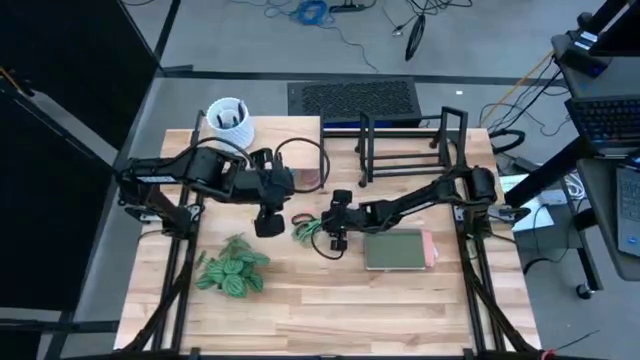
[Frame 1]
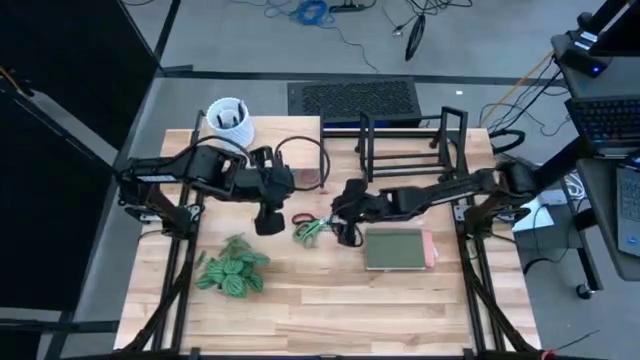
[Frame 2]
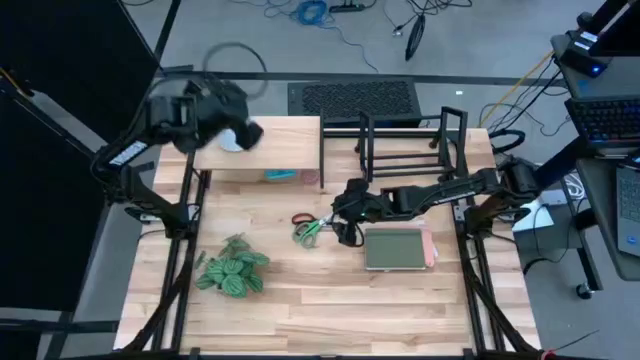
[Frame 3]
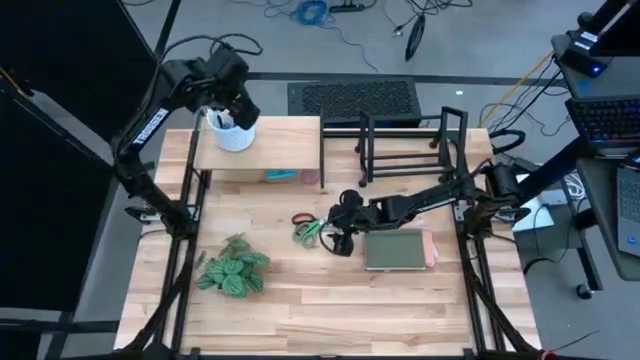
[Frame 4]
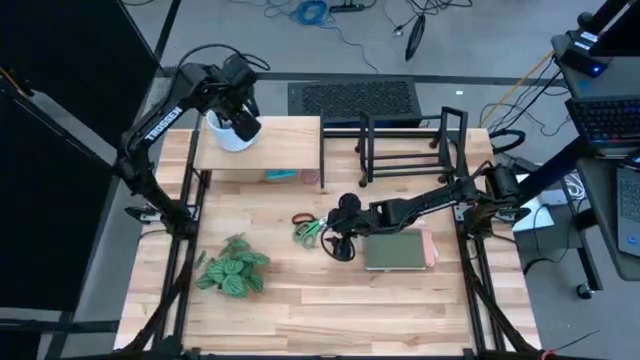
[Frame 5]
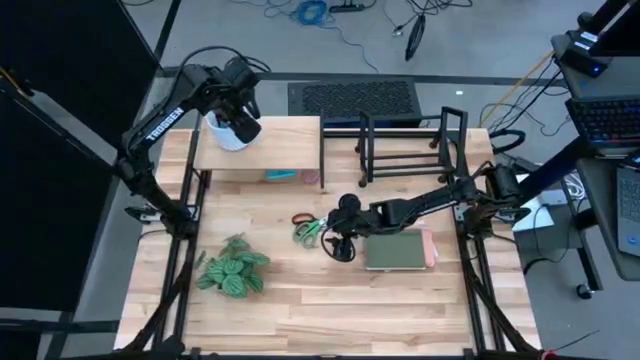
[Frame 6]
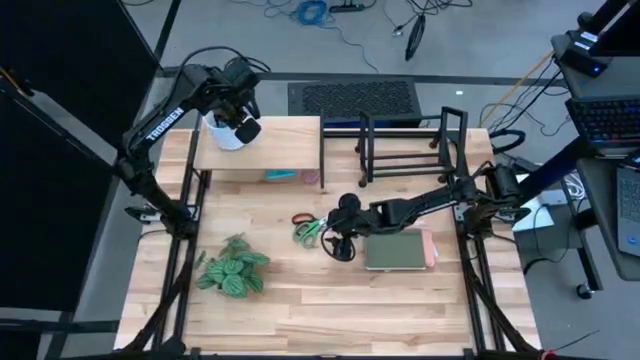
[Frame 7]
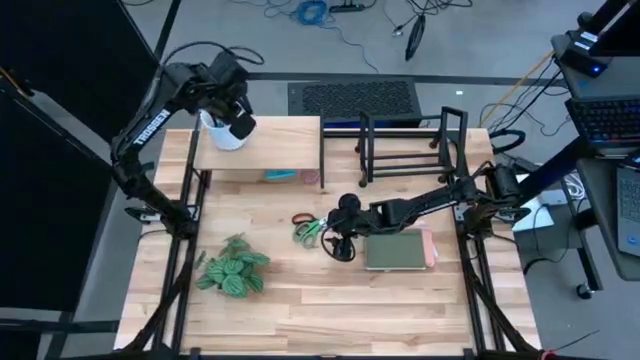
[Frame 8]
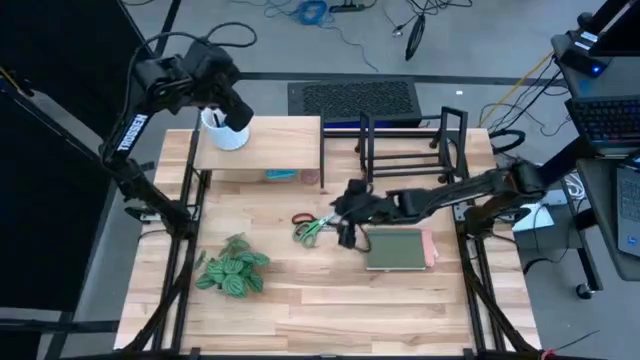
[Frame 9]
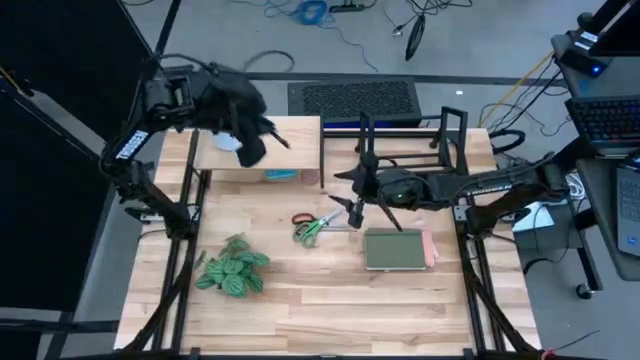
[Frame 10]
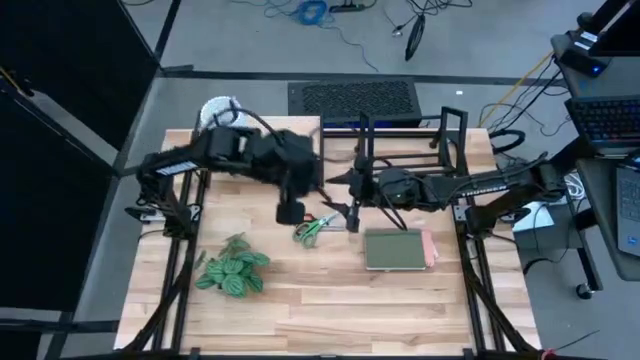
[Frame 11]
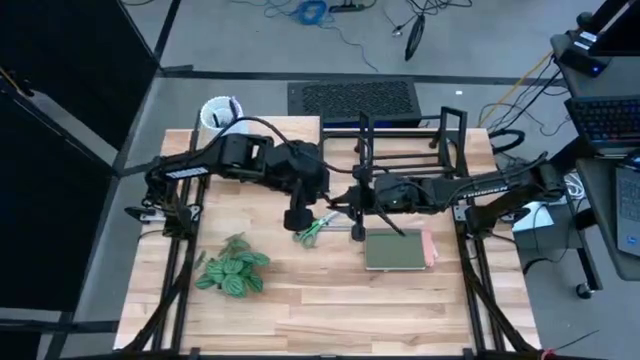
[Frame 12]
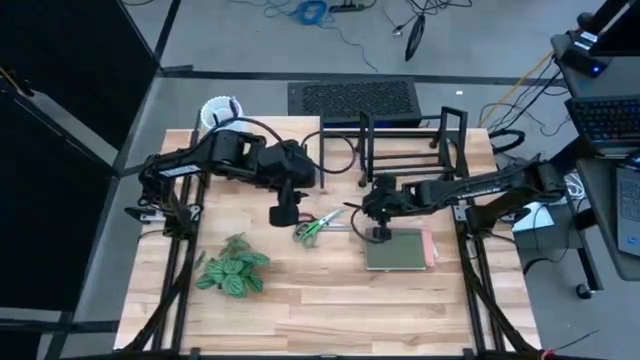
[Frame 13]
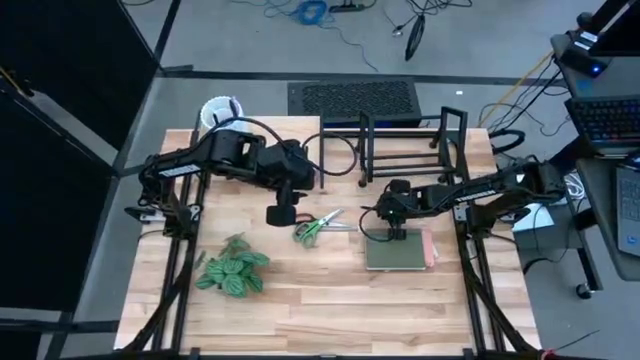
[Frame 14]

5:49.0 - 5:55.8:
Task: Stock shelves
Remove the black pen from the white pen holder

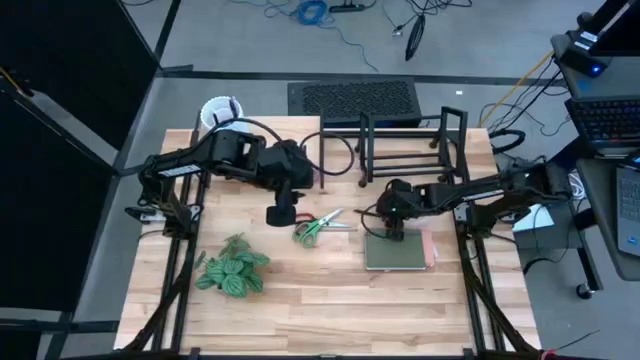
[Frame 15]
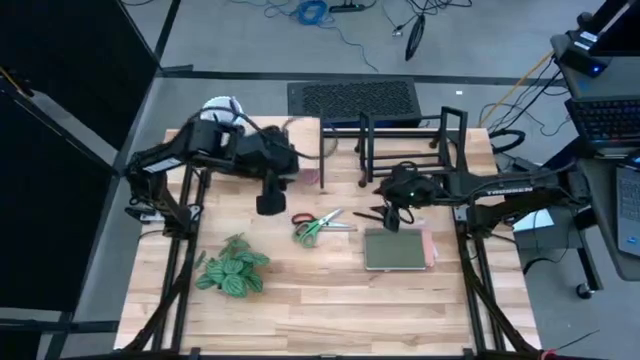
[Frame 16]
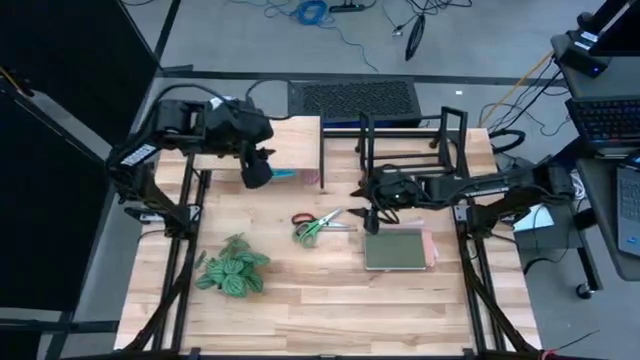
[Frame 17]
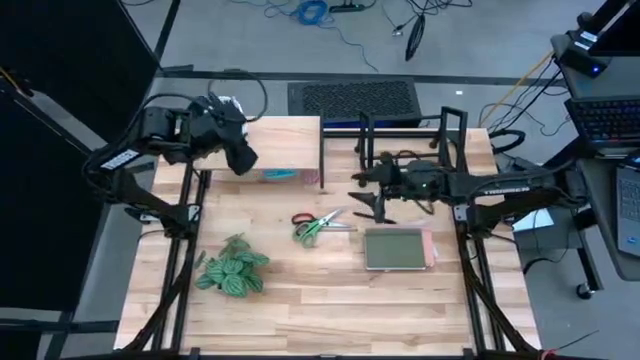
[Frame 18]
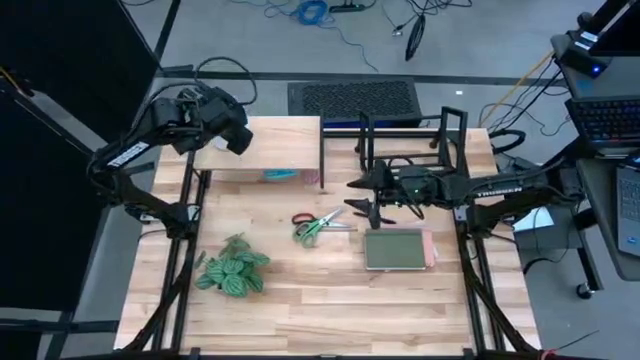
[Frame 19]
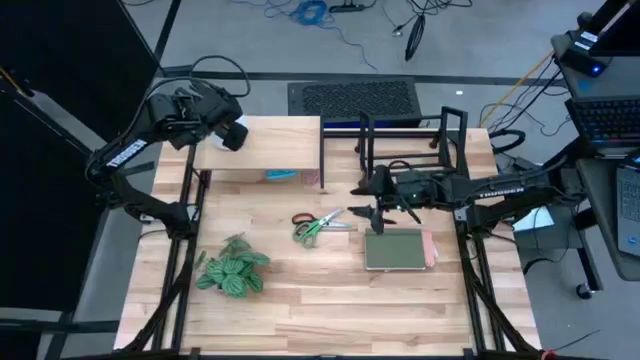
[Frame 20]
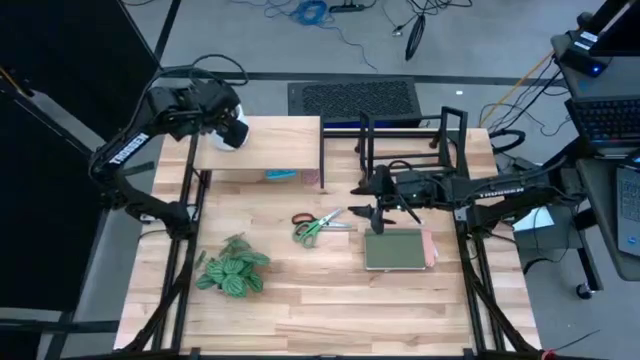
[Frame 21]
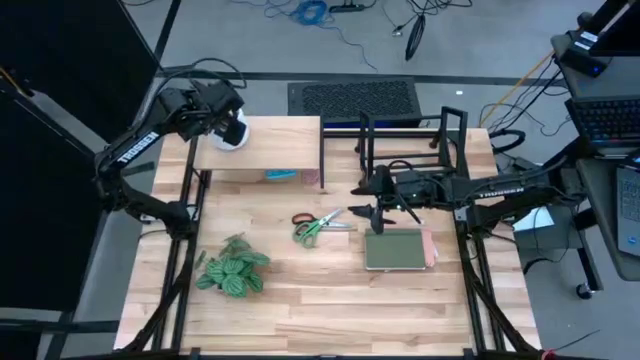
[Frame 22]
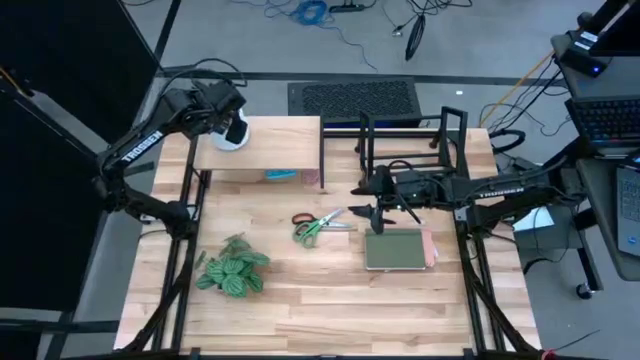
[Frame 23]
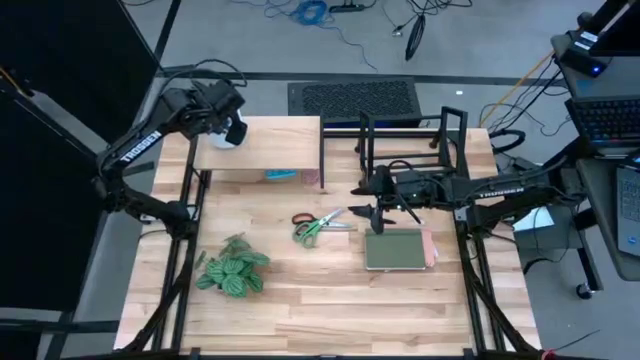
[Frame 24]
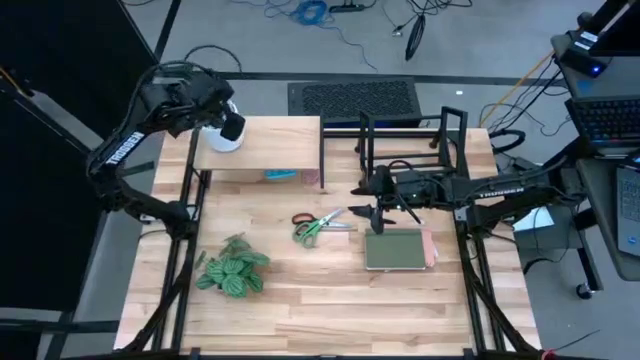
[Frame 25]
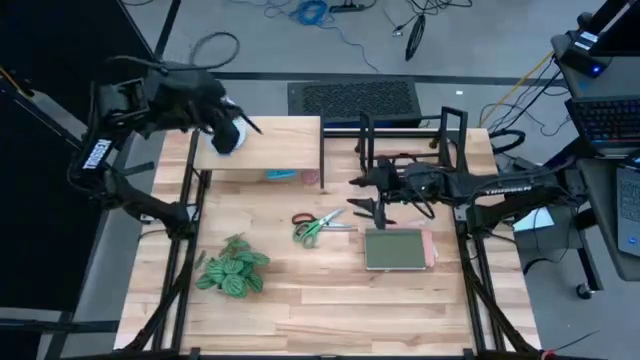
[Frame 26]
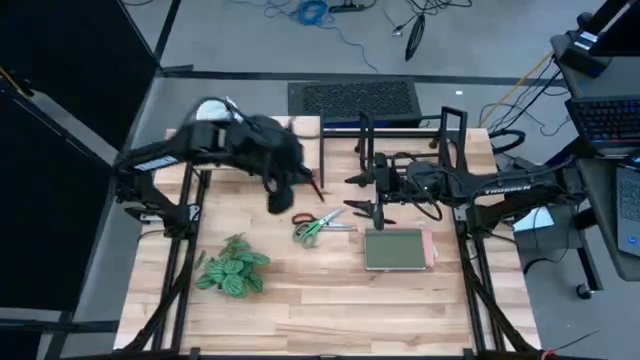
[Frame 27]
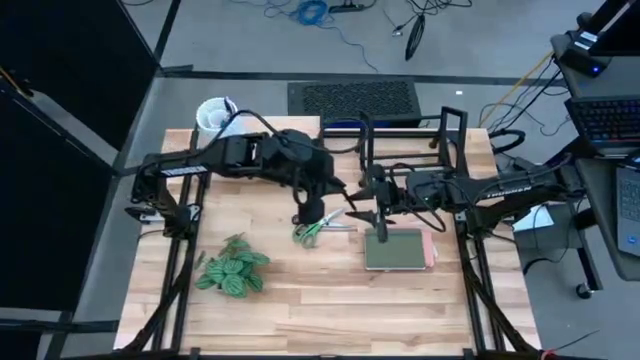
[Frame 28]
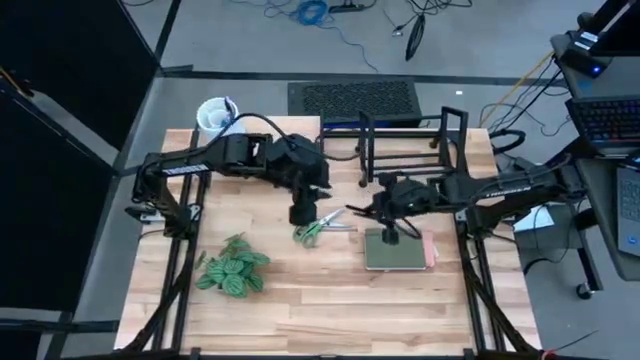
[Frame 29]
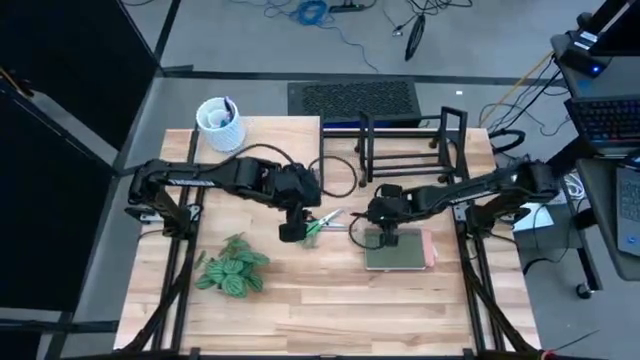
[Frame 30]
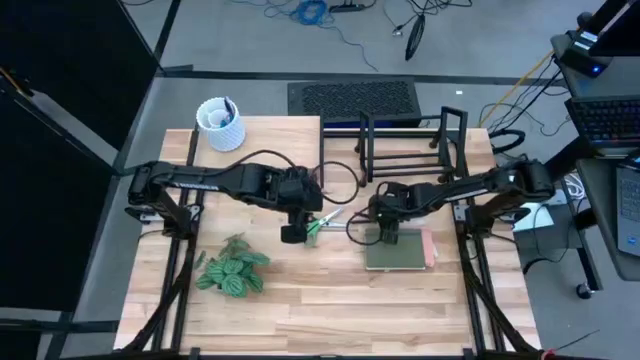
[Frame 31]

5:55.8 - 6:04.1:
Remove the black pen from the white pen holder

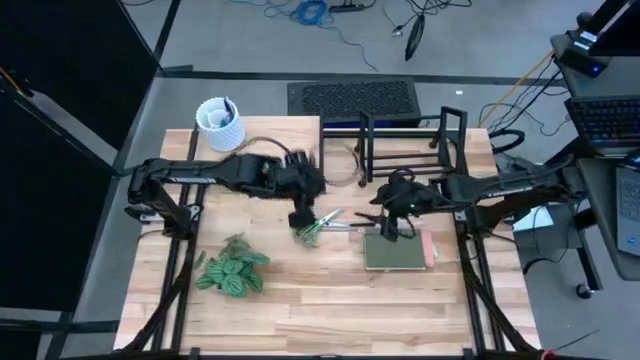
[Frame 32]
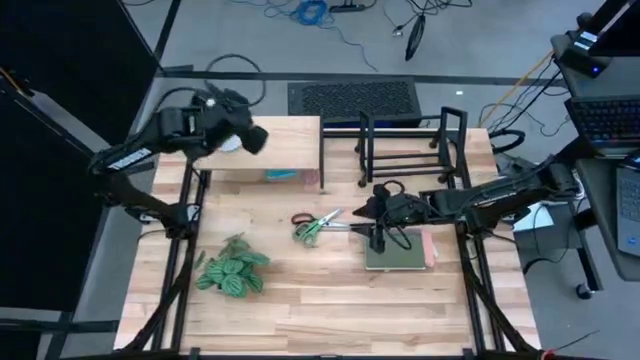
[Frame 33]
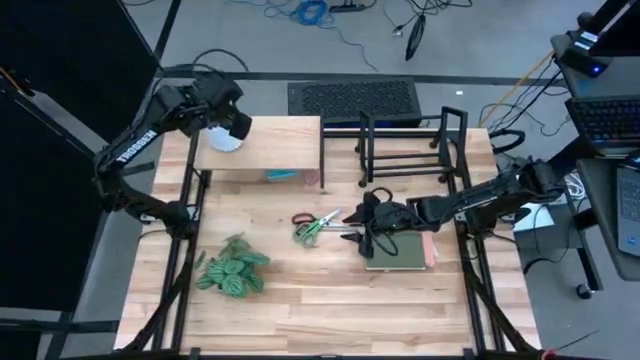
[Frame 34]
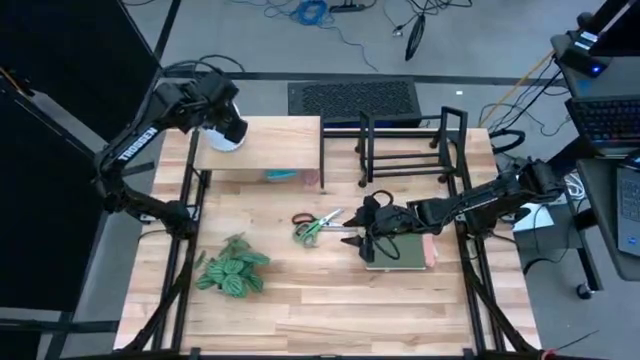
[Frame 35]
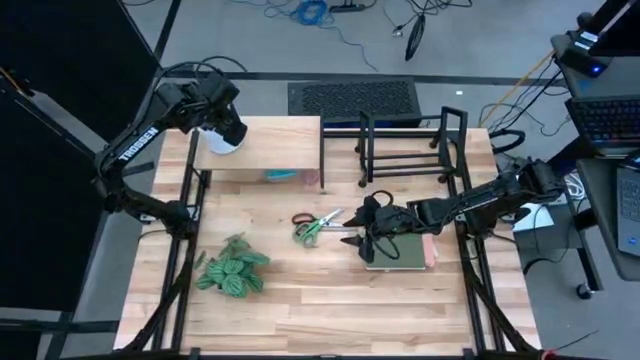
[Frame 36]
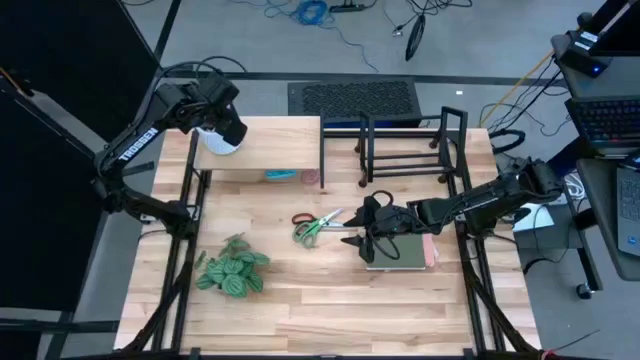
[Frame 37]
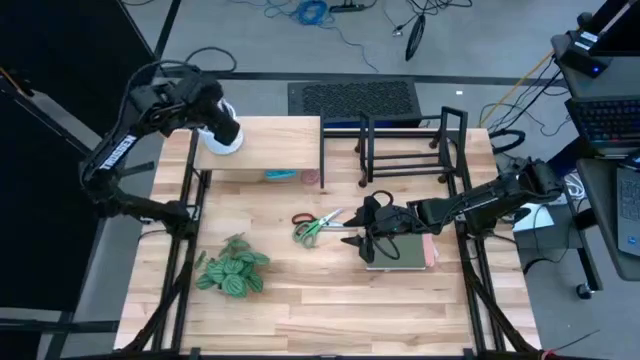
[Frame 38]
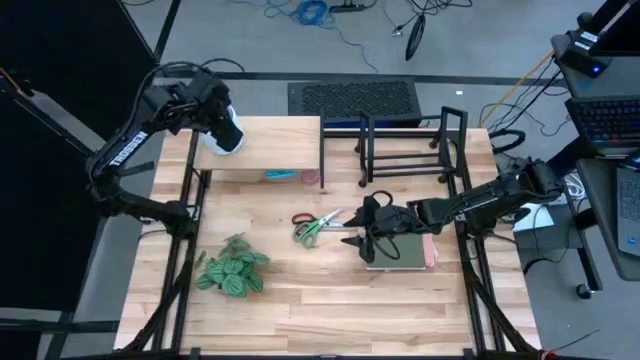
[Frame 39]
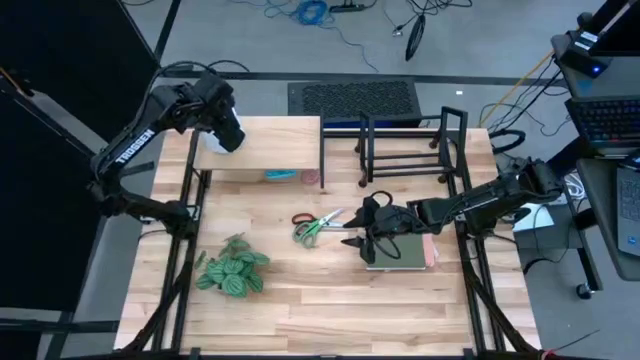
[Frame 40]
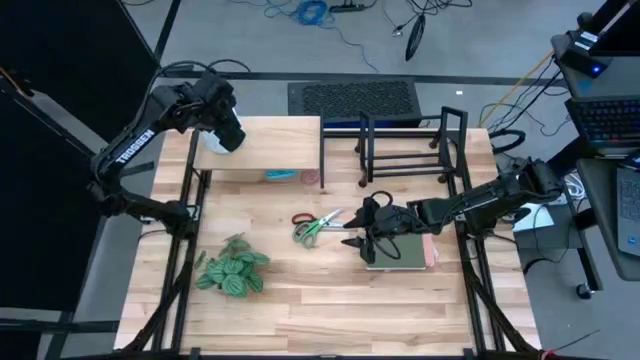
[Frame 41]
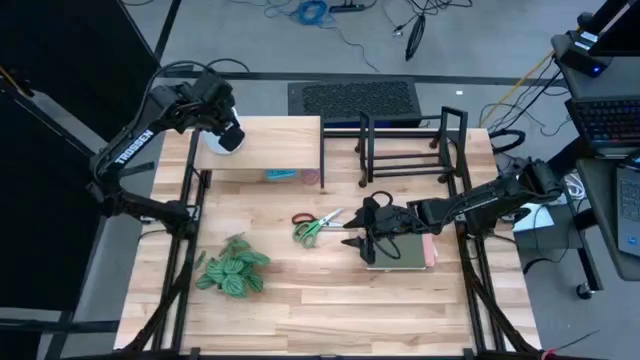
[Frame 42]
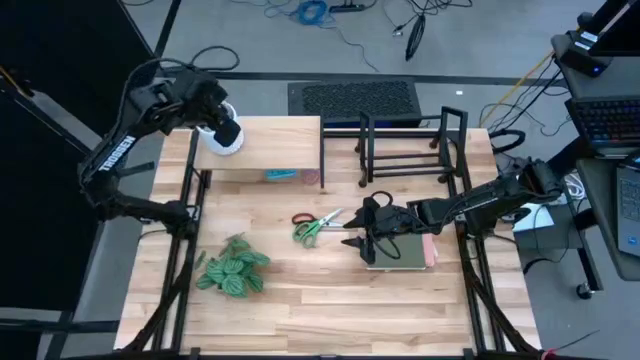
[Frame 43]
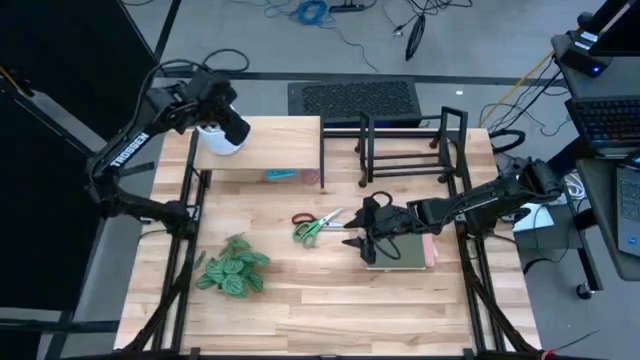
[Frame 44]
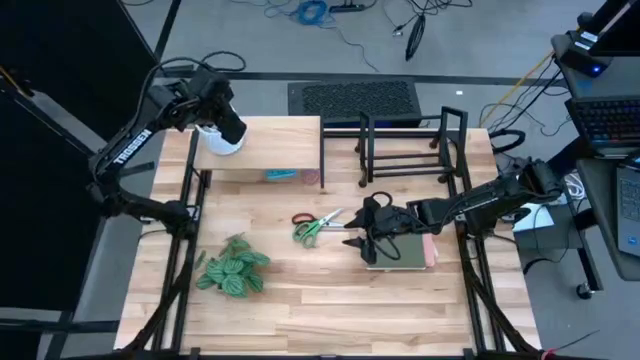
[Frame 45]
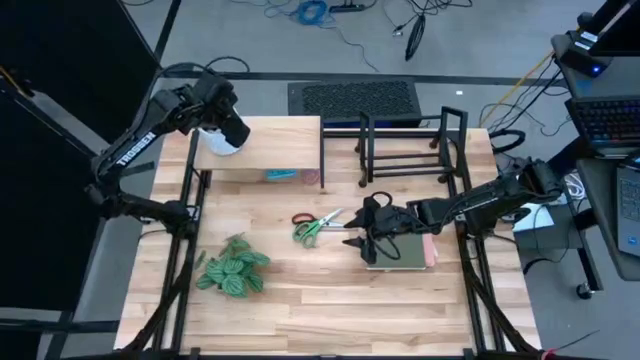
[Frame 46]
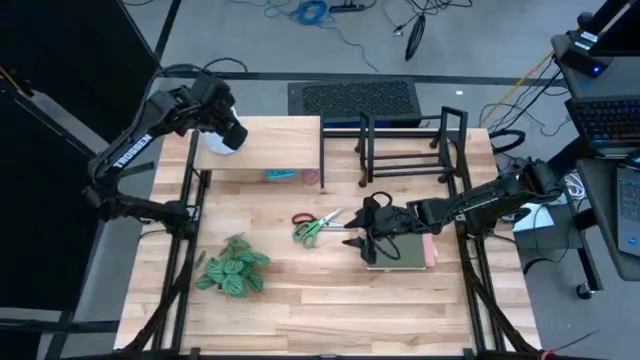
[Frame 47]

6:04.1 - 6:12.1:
Remove the blue pen from the white pen holder
